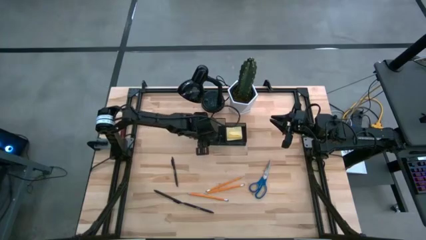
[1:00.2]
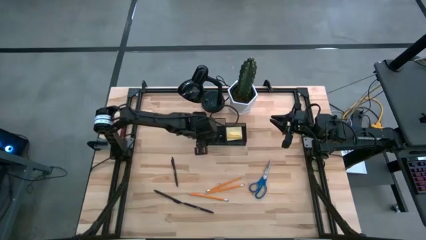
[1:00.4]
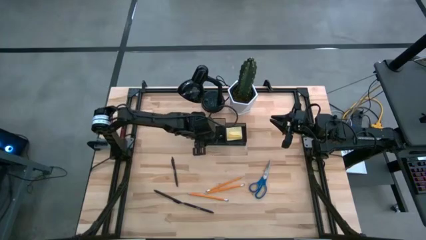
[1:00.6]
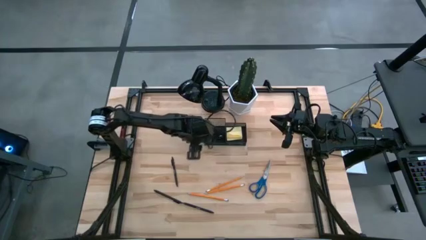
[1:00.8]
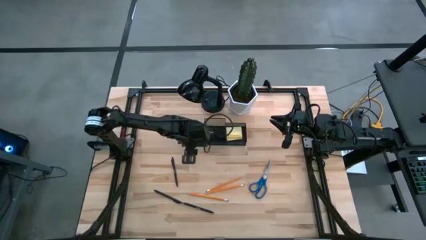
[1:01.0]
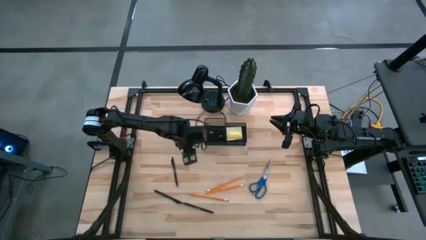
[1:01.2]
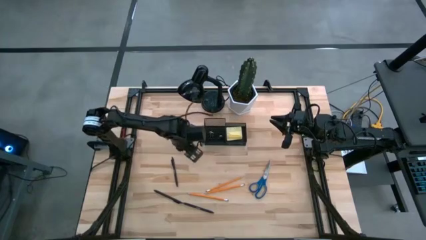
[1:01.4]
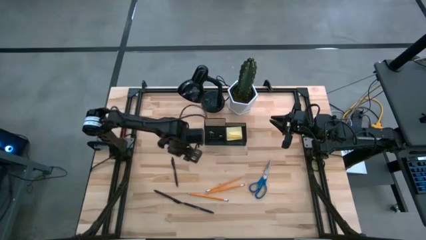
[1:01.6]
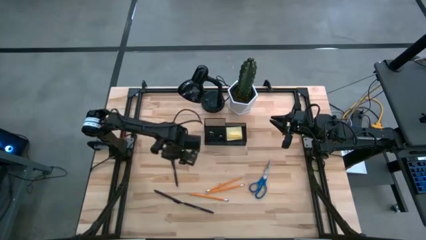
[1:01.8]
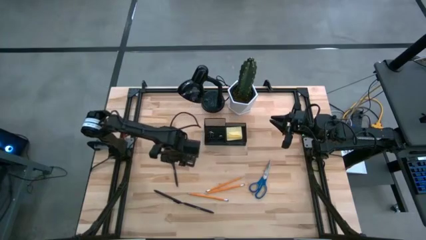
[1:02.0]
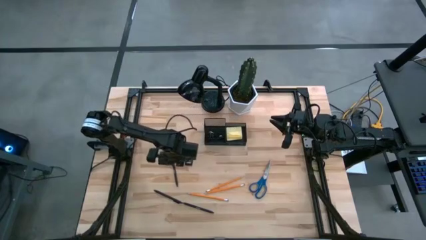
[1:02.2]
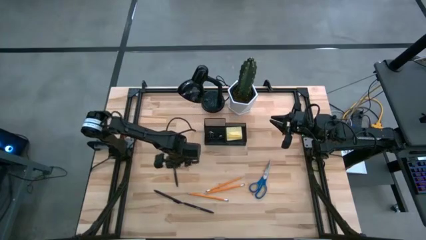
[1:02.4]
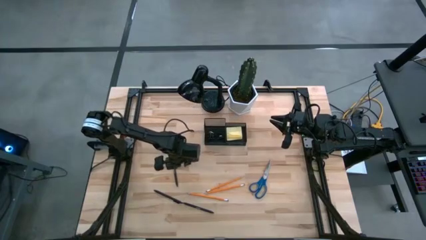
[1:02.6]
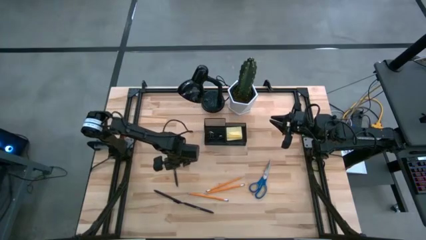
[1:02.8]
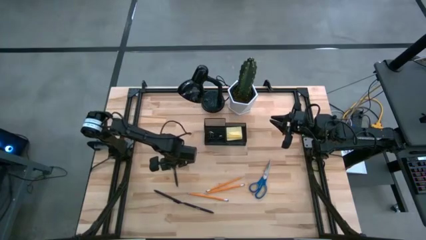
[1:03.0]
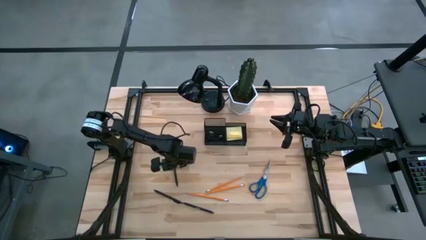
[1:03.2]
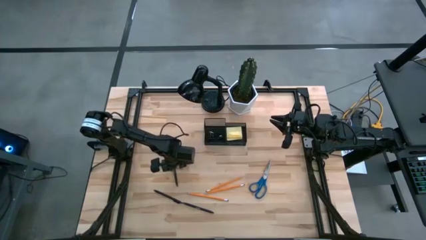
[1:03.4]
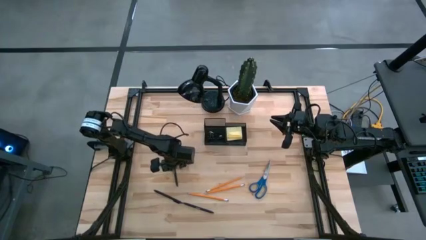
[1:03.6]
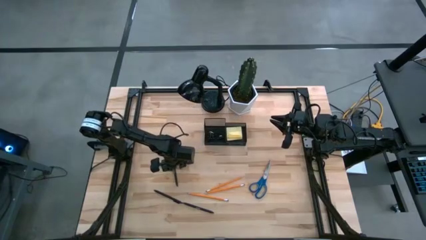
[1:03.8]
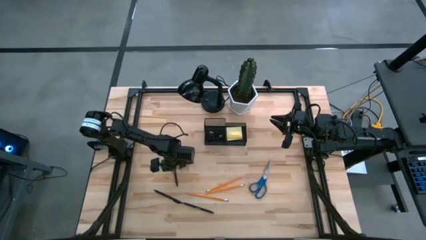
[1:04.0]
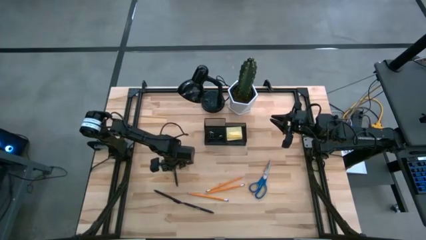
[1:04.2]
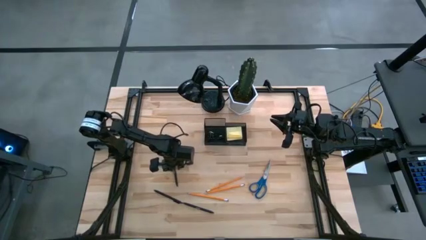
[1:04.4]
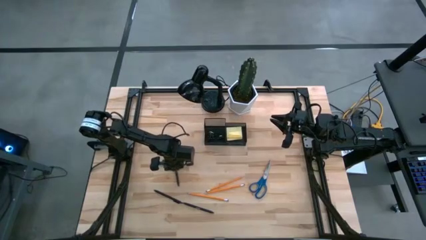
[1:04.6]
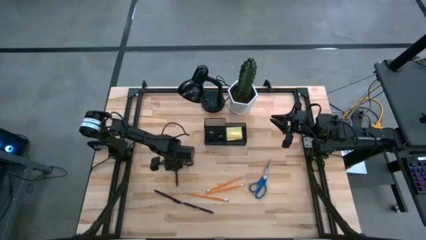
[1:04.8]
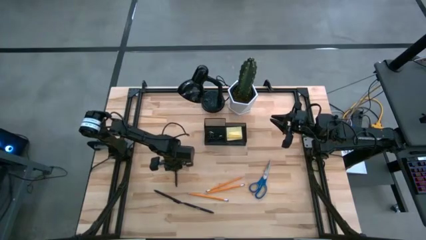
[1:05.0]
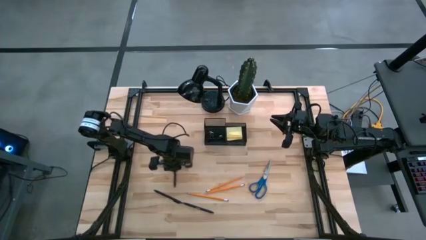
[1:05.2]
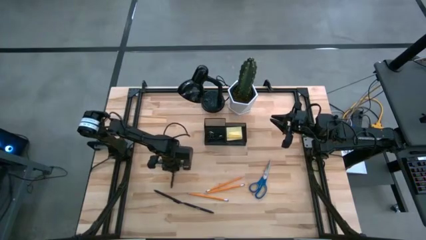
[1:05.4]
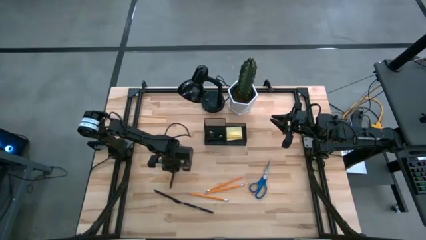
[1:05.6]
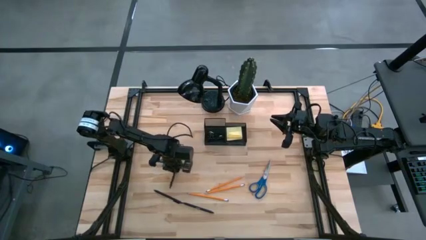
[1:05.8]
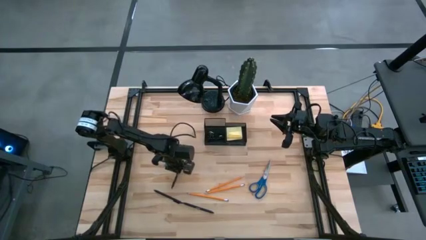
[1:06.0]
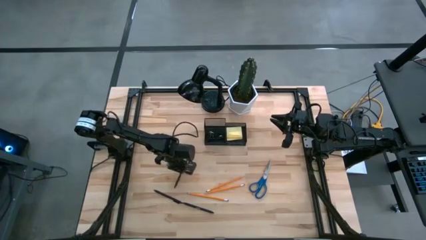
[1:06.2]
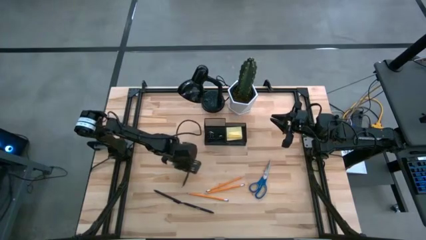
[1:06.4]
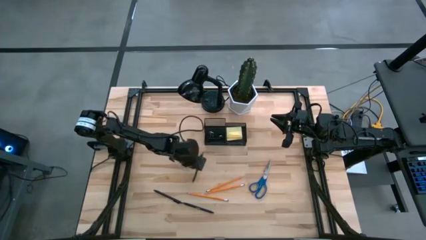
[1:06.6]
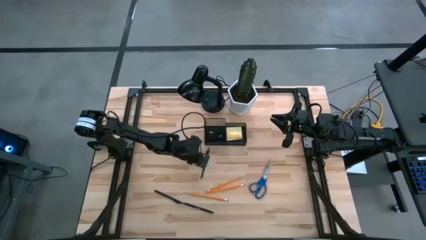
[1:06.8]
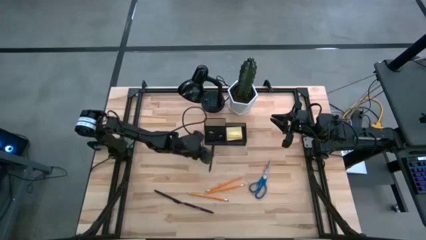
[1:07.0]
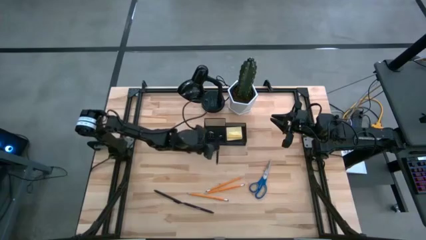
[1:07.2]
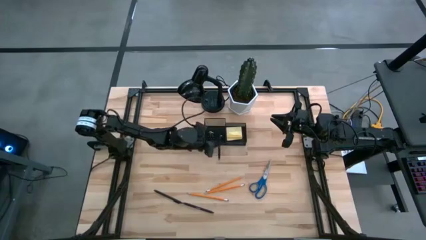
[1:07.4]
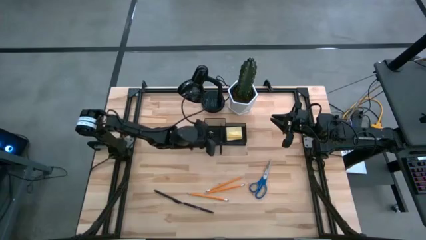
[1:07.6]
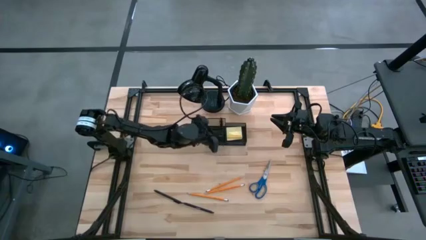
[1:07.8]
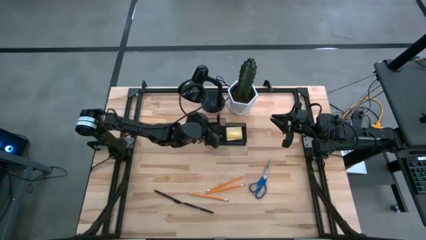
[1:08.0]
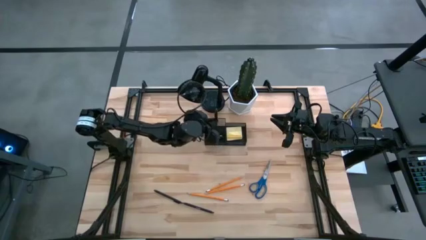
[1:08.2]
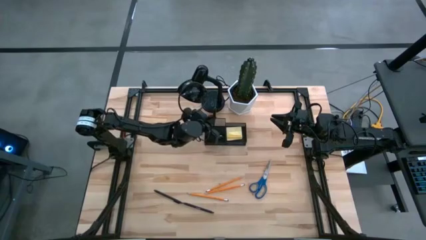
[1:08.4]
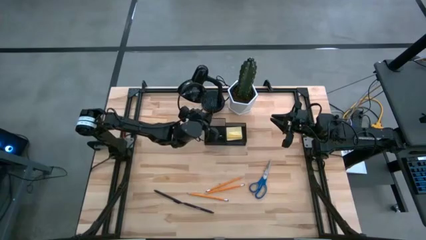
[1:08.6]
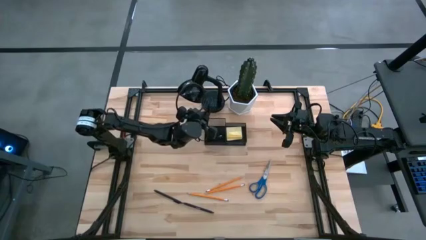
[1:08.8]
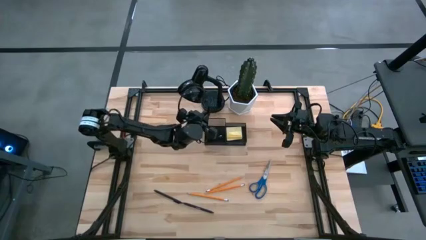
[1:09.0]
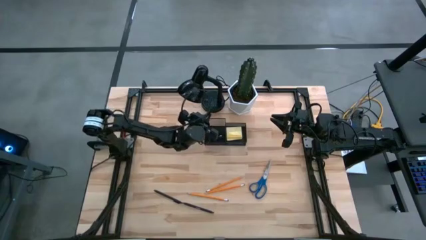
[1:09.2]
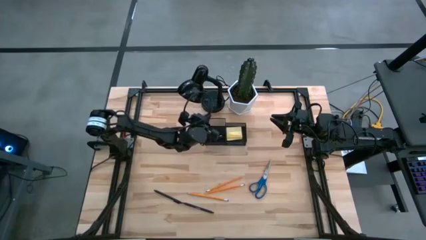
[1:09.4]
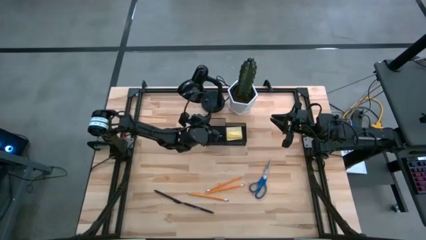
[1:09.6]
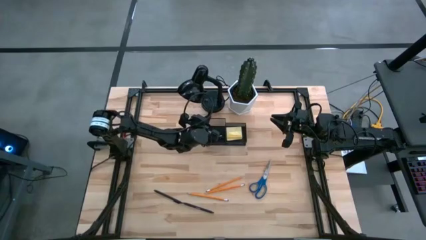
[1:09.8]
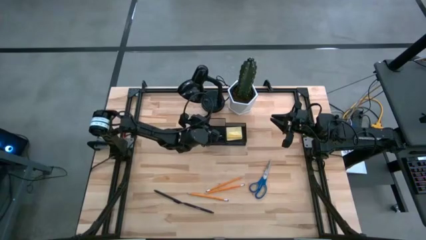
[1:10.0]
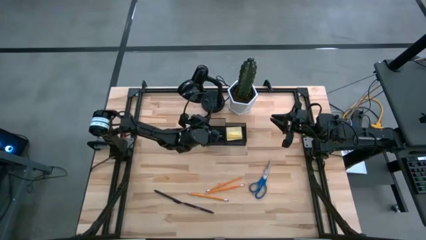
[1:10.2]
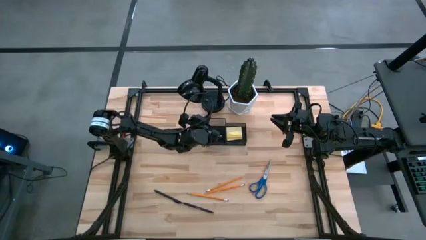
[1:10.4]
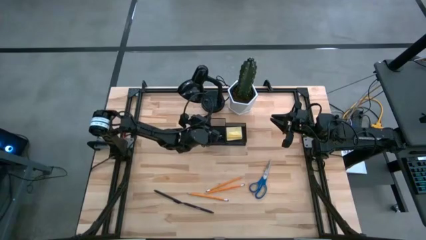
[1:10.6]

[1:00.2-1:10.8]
Task: Pick and place office supplies into organizer
Put the top black pen into the black desk organizer

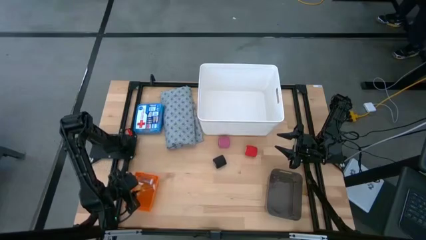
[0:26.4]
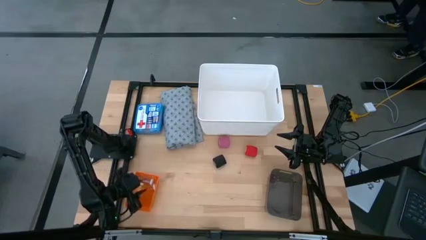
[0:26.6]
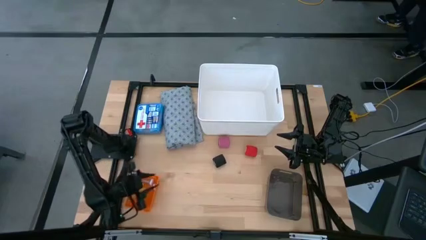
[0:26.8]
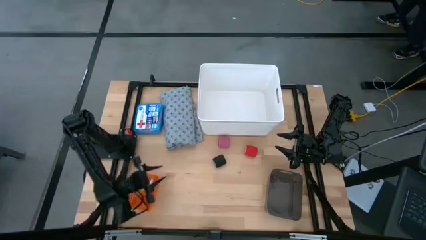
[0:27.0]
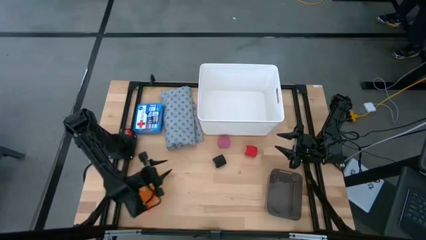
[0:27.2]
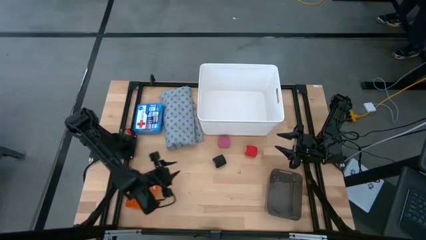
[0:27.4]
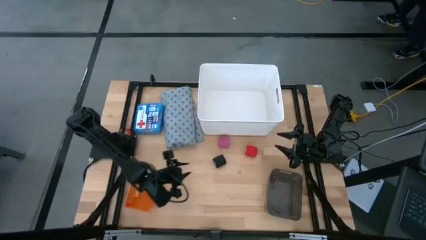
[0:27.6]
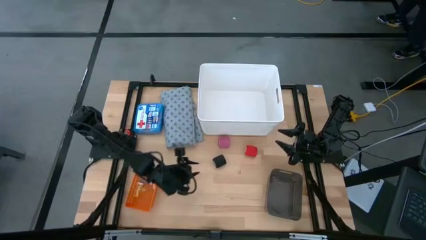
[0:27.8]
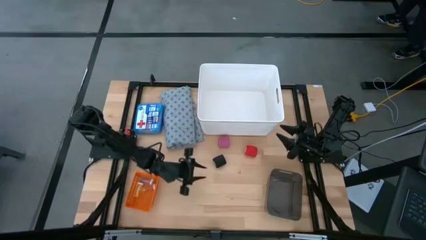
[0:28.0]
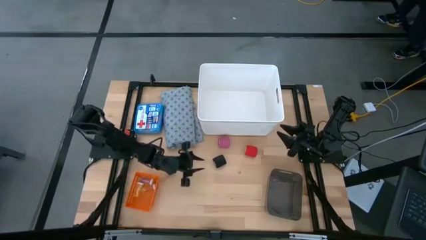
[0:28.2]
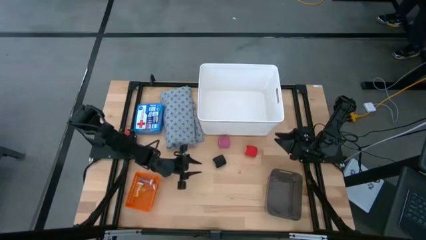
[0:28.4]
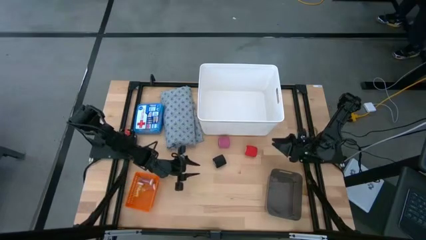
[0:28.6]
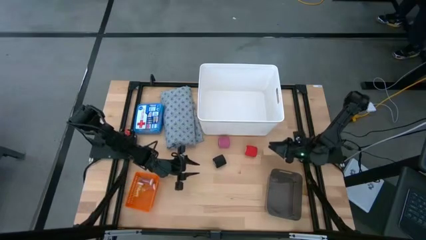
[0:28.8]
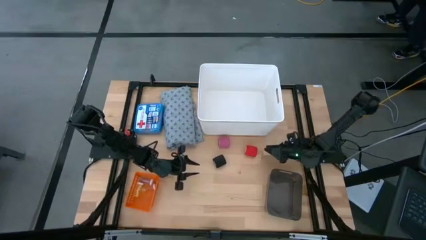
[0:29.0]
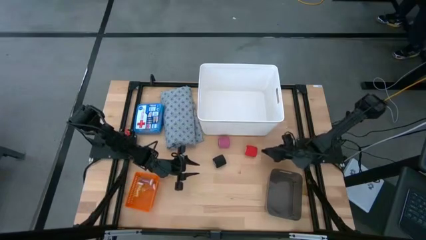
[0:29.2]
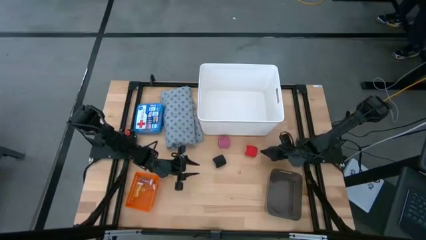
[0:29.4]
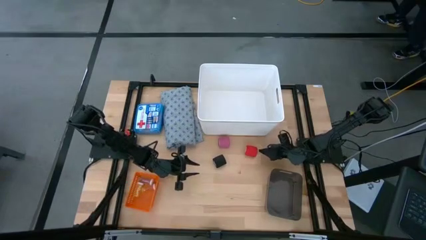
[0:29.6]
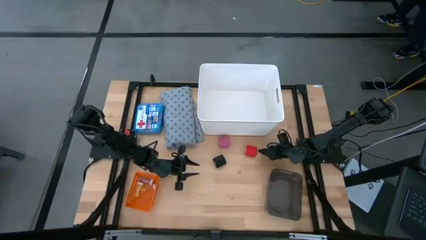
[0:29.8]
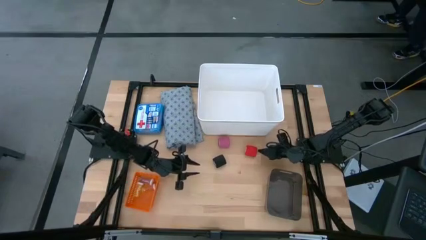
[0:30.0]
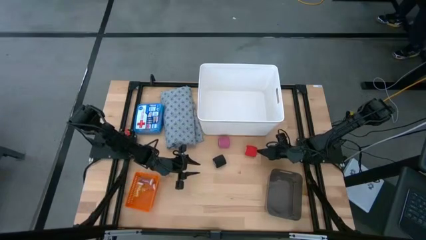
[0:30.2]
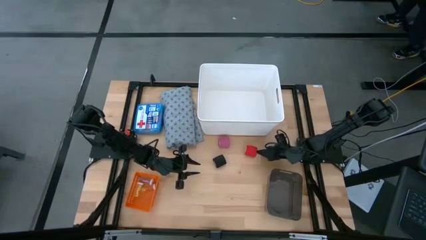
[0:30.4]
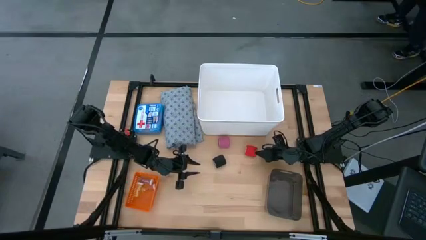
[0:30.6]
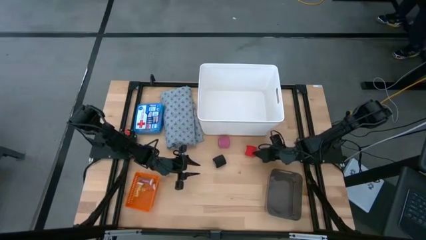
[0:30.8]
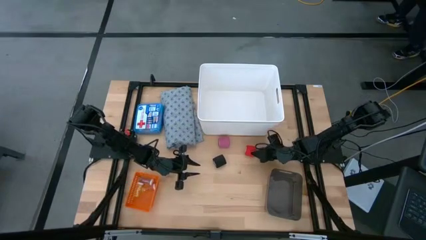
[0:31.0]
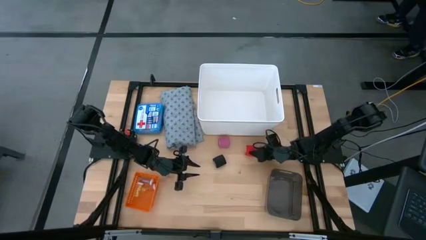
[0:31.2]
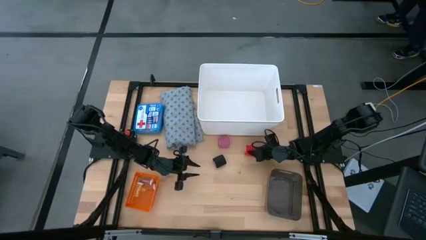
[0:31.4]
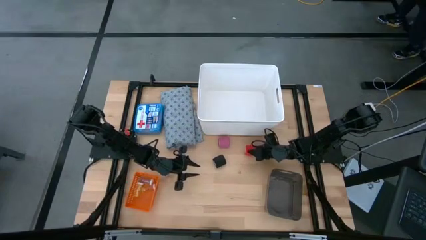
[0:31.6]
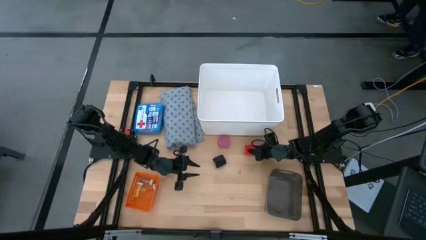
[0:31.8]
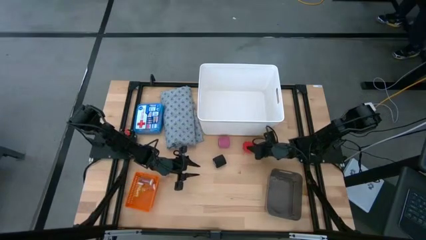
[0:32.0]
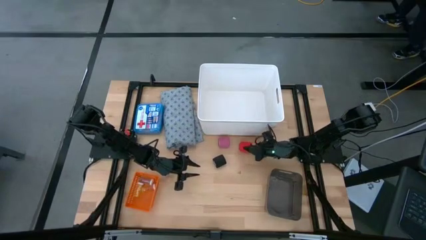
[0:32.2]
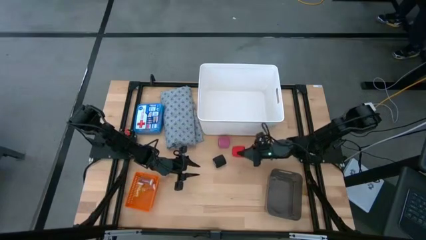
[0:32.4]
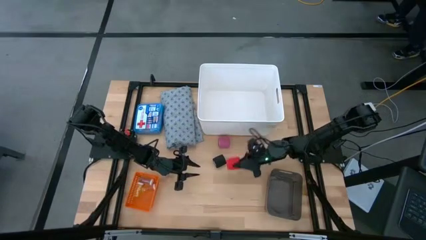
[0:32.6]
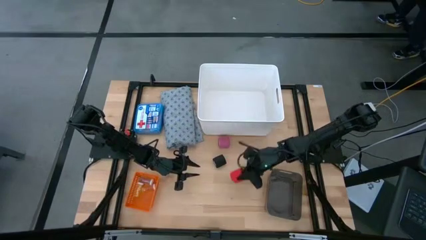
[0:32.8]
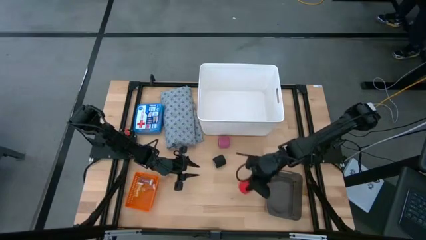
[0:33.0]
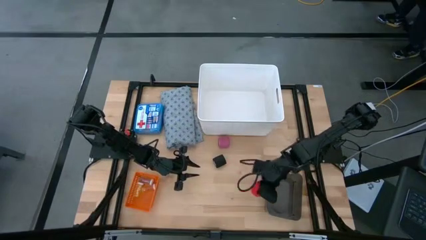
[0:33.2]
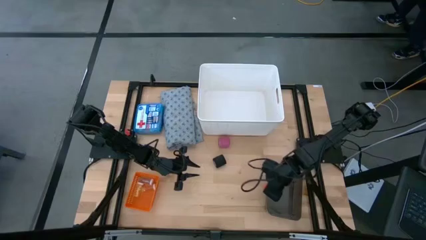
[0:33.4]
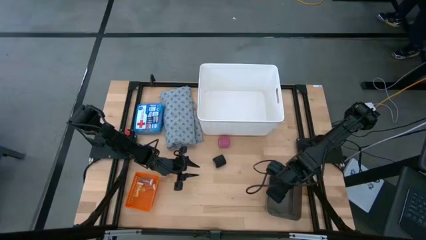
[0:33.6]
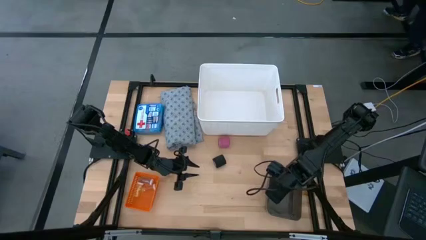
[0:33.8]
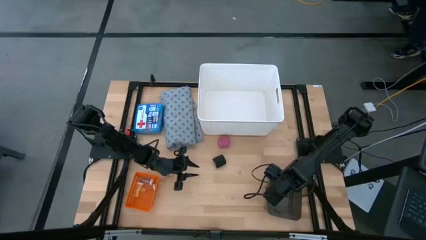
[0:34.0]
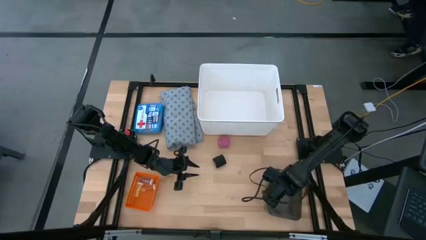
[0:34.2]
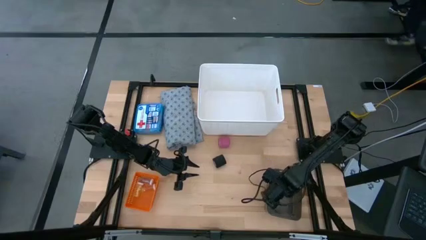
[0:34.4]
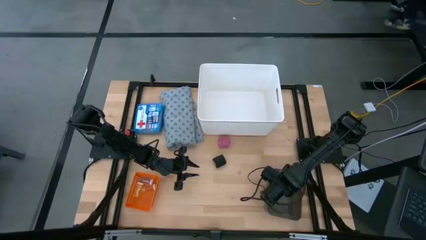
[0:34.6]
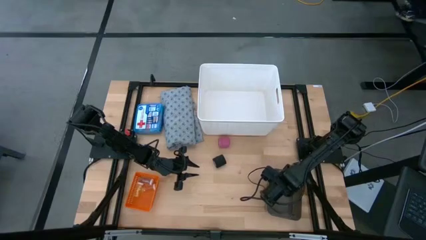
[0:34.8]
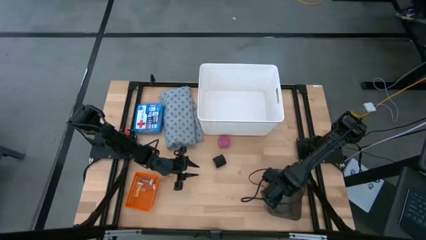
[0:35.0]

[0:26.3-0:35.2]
Task: Pick & Place Medicine items
Put the red bandage into the black bin
